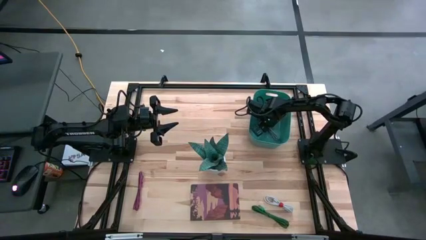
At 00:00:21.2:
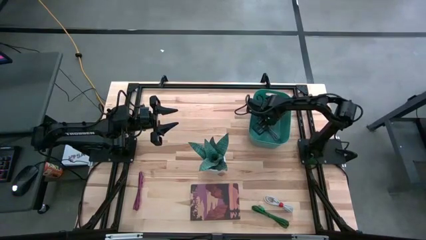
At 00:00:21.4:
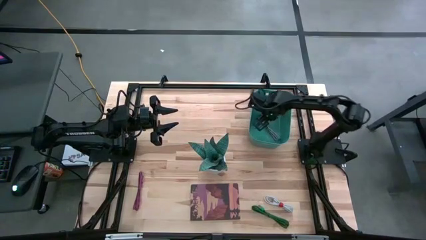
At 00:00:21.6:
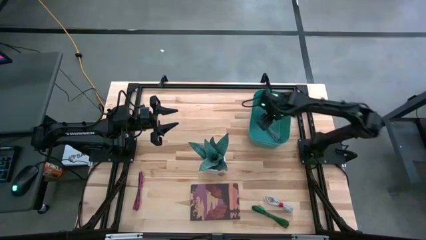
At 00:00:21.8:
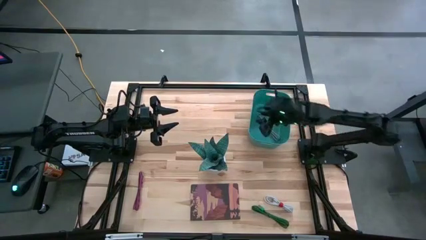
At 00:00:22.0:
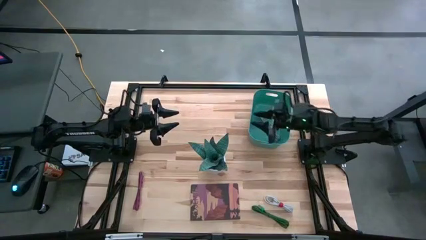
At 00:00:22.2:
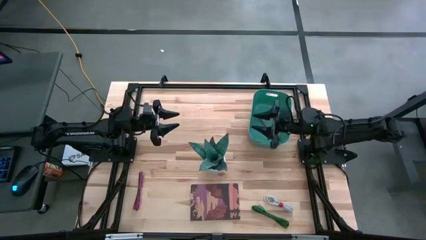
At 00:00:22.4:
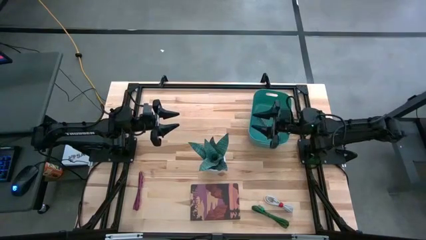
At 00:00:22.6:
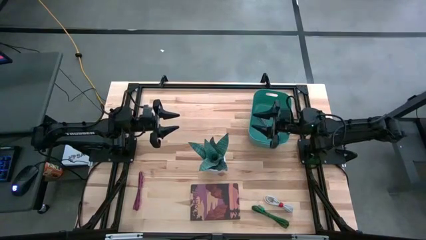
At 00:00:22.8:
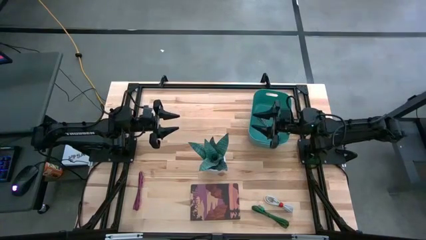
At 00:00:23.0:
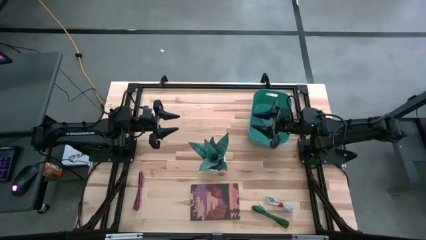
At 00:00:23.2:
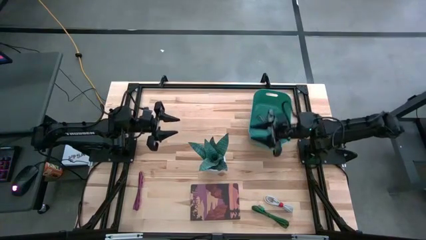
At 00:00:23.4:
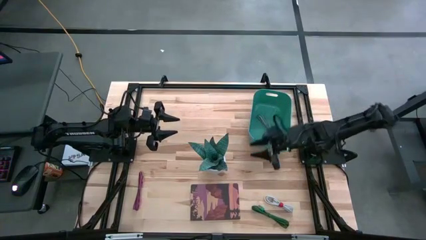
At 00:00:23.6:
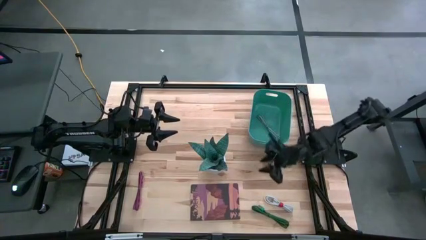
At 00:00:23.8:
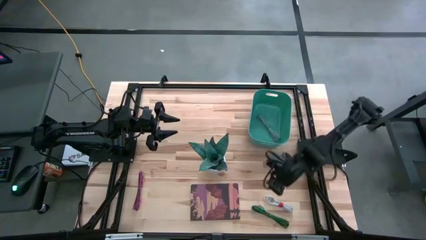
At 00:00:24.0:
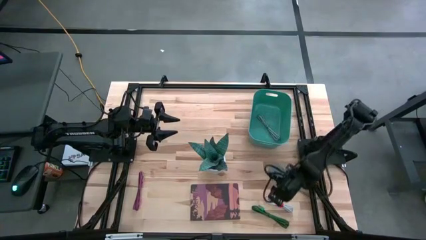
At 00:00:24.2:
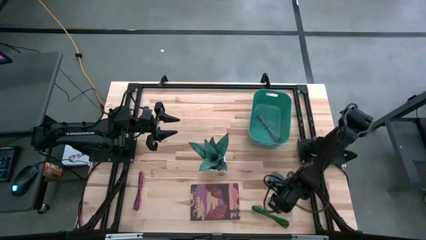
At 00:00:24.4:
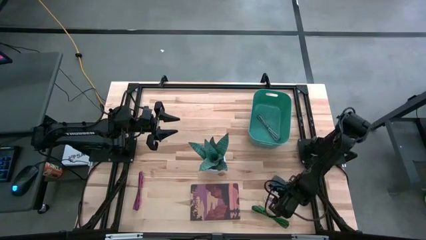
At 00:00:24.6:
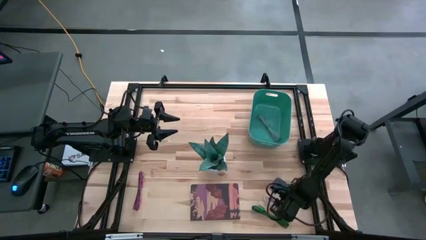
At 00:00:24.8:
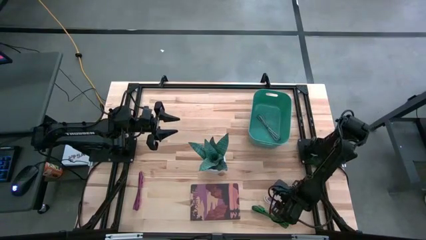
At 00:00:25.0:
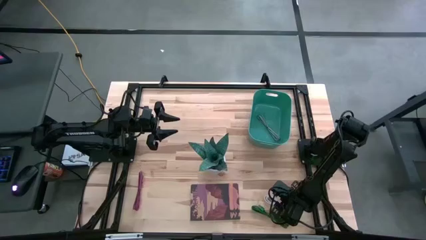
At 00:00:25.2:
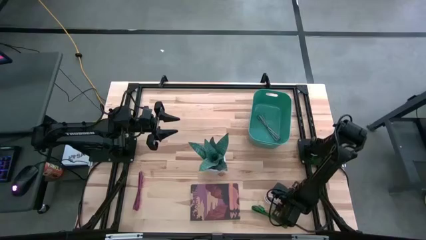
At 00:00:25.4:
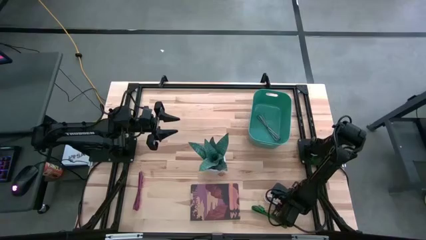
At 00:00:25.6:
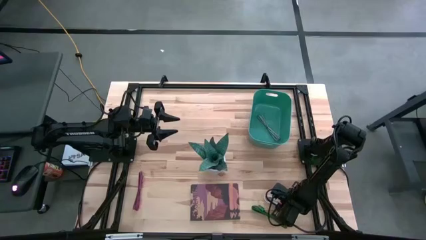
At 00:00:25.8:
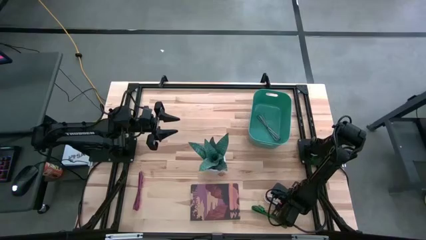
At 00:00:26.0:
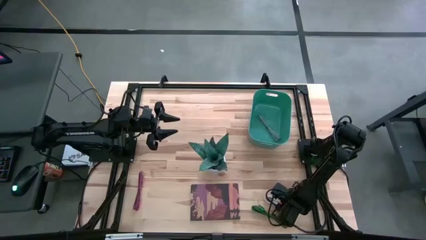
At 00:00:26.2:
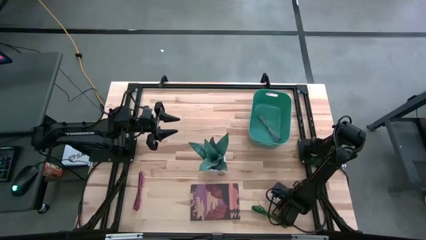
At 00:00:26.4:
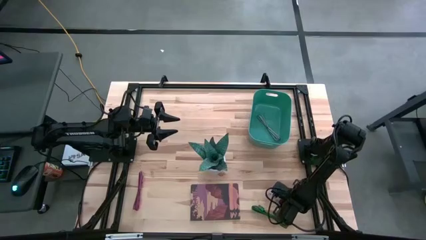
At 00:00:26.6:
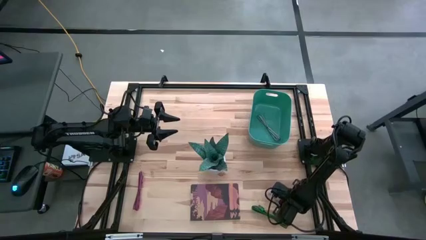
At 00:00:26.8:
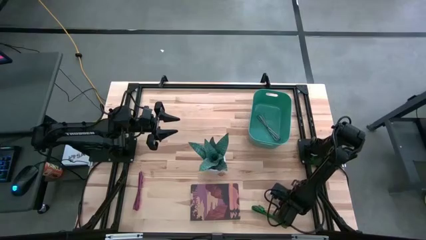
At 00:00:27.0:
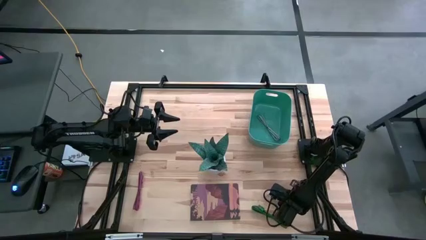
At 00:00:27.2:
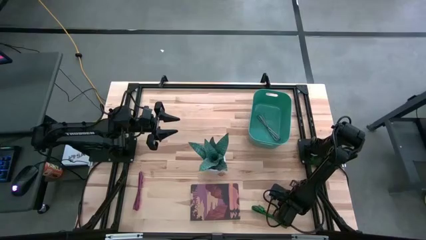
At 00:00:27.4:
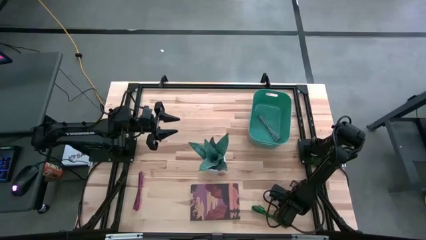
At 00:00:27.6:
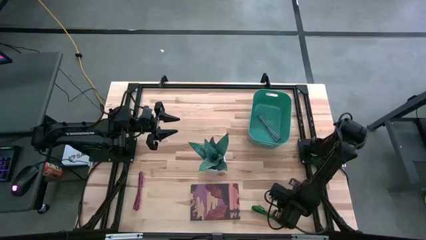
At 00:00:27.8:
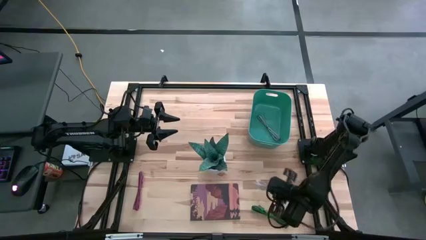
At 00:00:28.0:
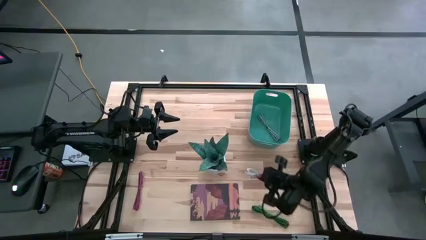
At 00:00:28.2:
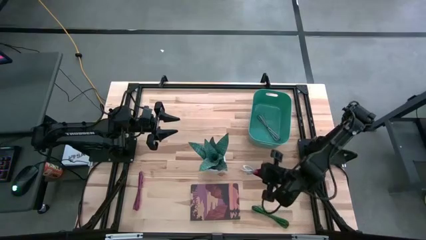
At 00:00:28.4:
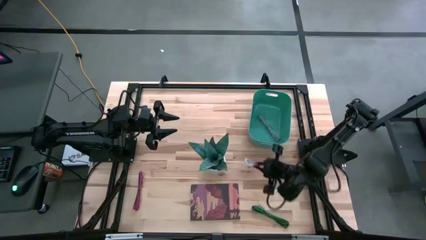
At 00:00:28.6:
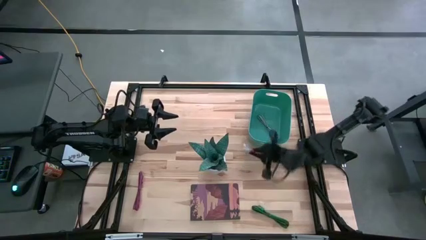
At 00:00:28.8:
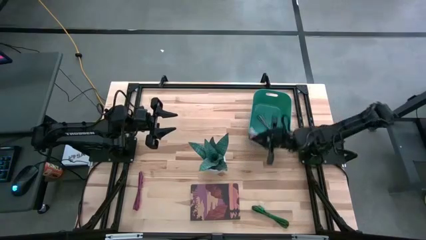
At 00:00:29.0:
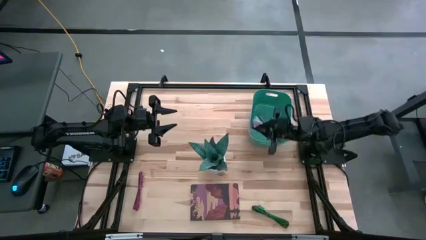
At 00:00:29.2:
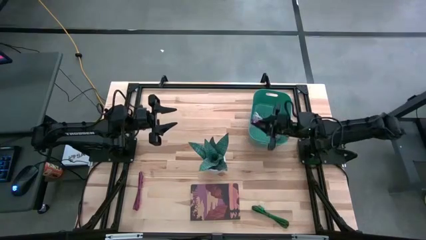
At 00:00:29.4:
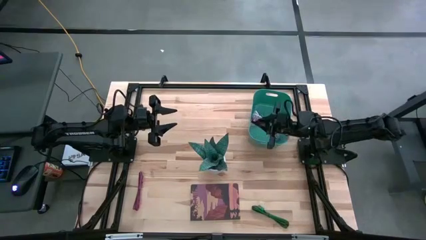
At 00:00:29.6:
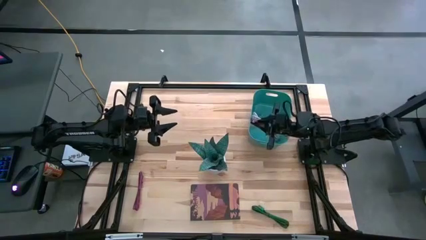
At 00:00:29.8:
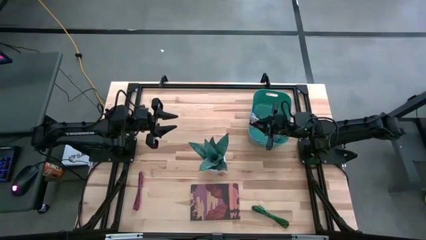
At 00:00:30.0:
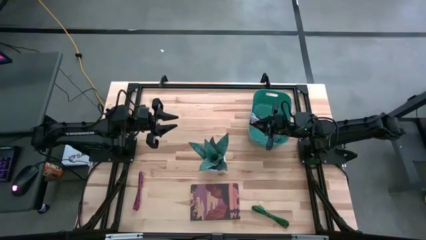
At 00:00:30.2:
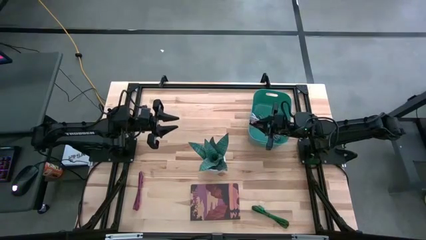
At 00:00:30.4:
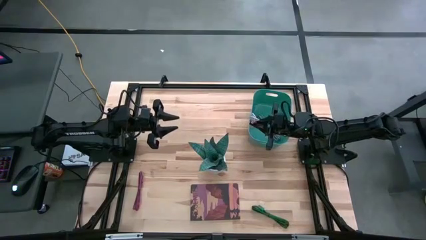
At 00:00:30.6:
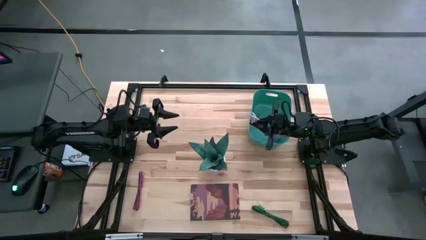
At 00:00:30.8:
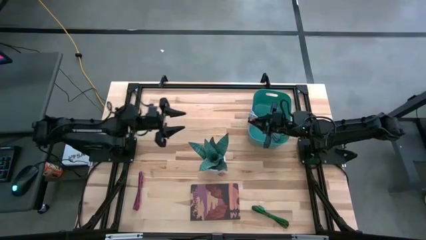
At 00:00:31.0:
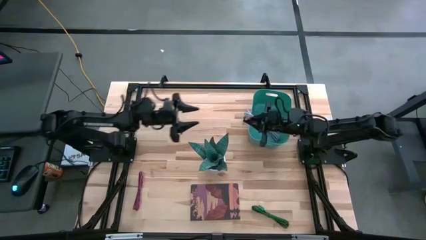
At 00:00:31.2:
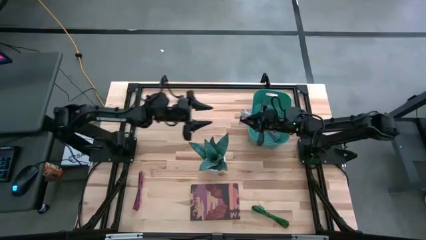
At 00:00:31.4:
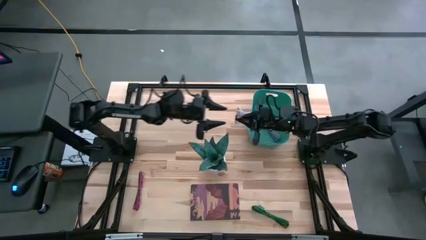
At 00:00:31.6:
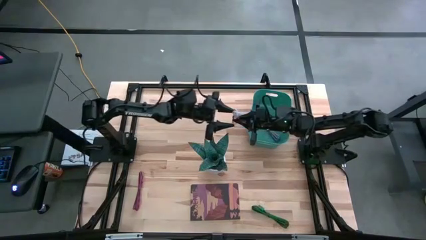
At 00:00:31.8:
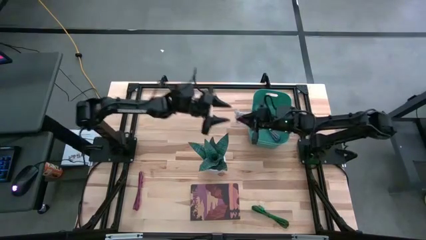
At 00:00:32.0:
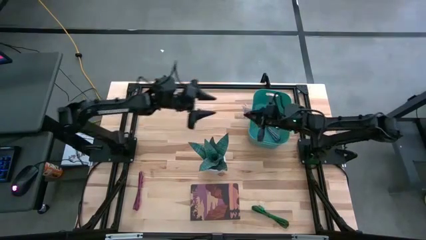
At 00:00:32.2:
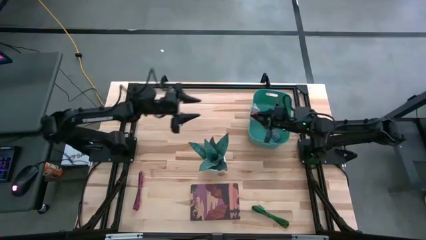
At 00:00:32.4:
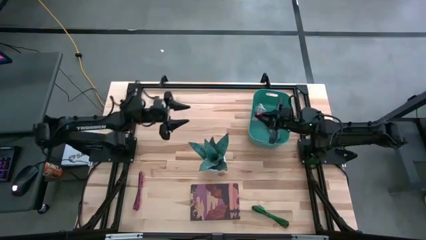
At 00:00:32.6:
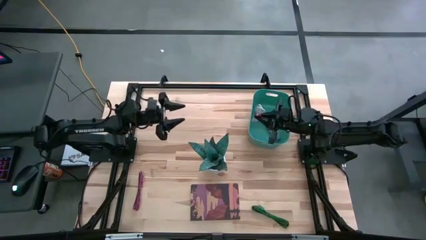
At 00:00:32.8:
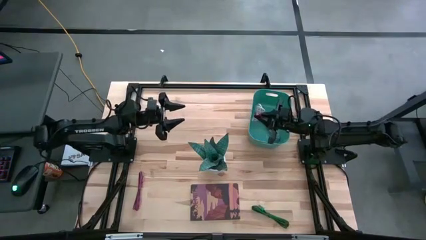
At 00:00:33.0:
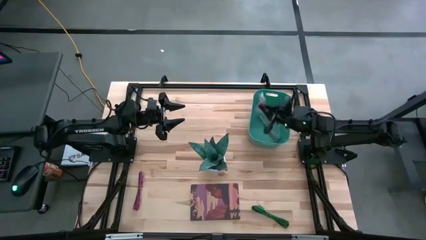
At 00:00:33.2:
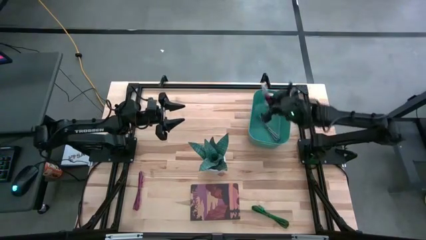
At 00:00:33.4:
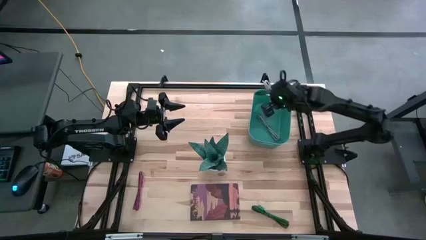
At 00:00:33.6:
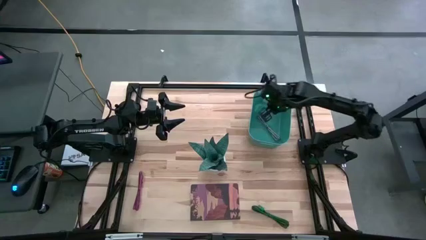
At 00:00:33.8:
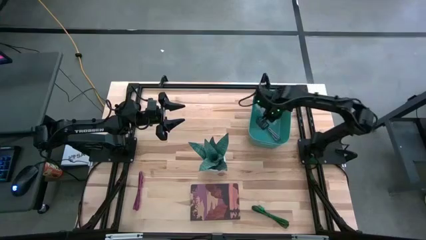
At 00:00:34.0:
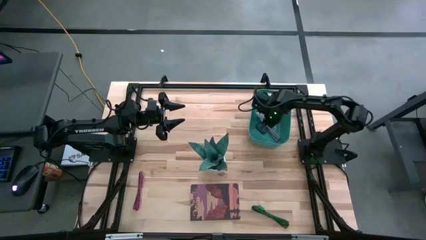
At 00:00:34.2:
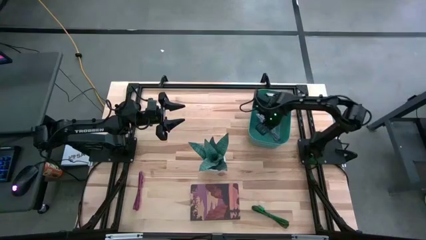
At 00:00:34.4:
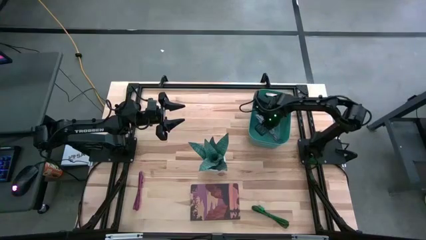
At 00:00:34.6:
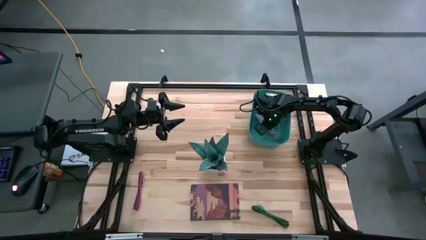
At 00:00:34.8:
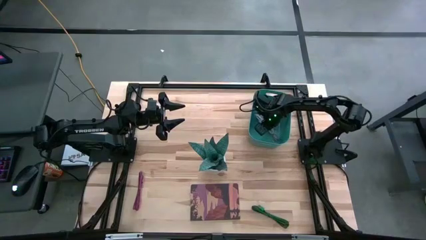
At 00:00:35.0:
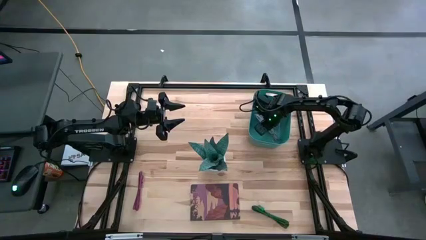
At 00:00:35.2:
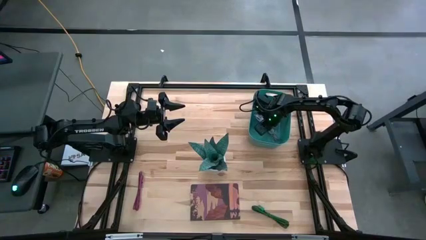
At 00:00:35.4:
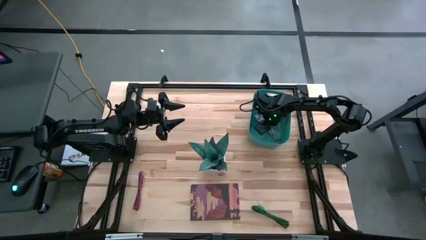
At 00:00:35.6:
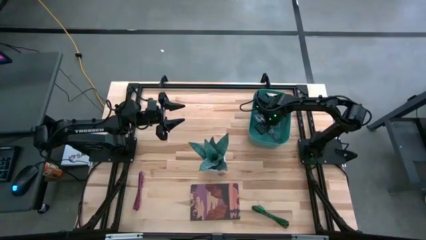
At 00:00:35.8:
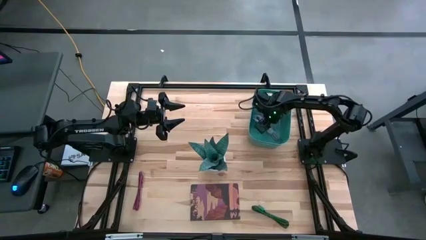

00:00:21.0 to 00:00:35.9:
Task: Pick and place USB-C Cables
Put the white charger cable into the green container
